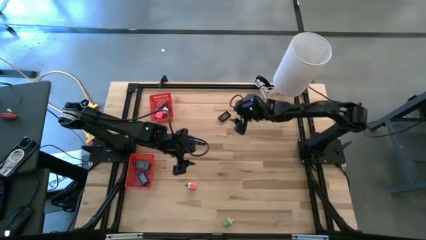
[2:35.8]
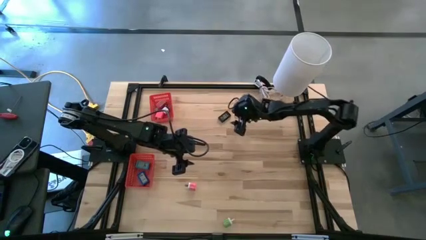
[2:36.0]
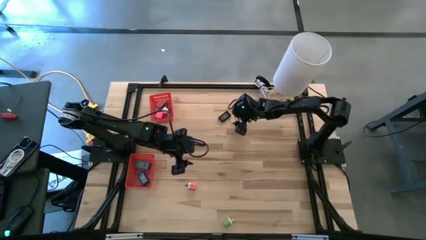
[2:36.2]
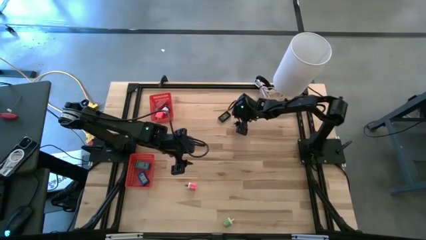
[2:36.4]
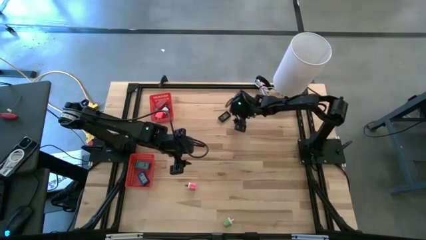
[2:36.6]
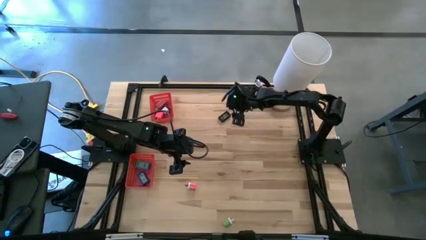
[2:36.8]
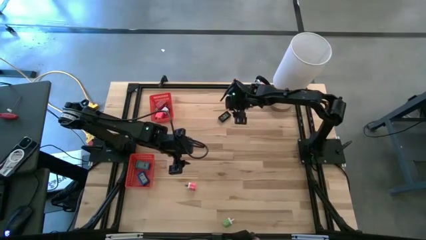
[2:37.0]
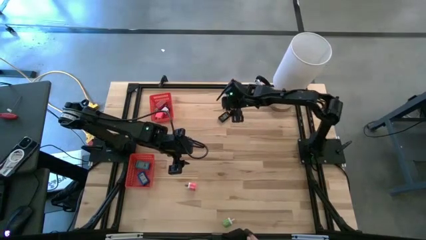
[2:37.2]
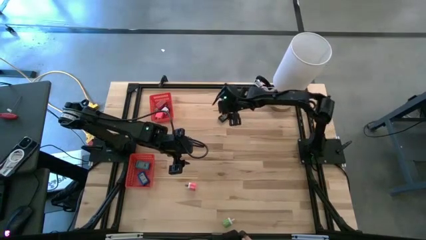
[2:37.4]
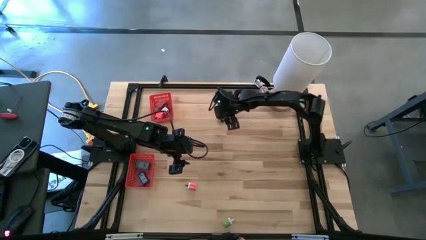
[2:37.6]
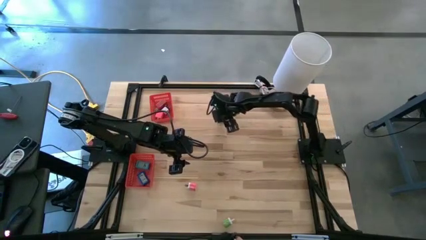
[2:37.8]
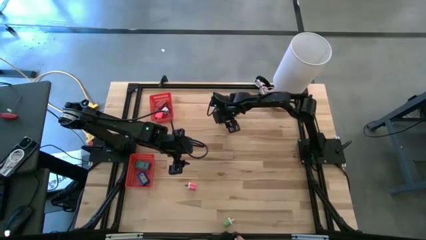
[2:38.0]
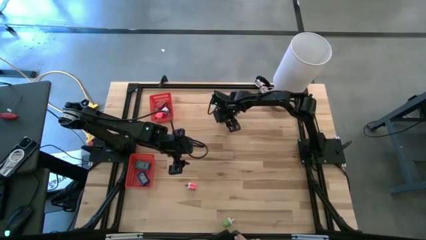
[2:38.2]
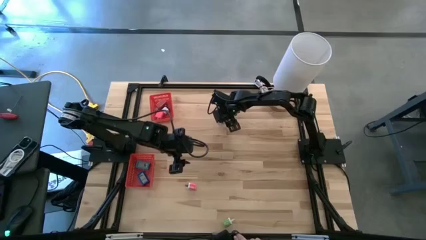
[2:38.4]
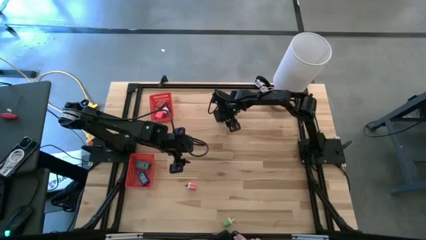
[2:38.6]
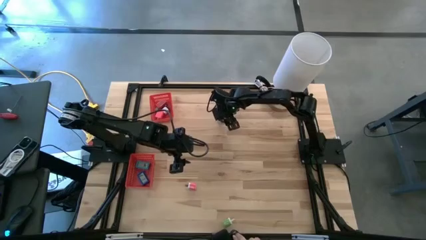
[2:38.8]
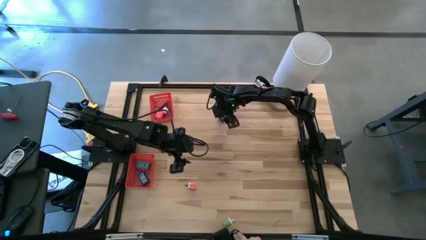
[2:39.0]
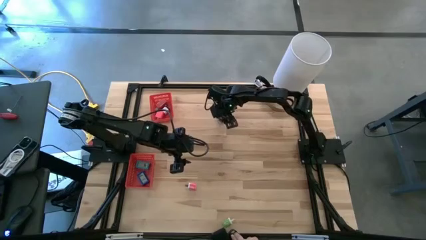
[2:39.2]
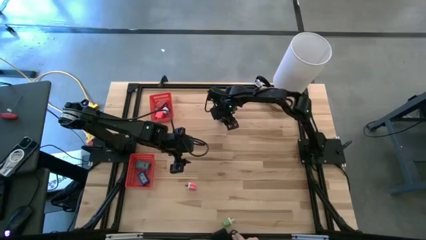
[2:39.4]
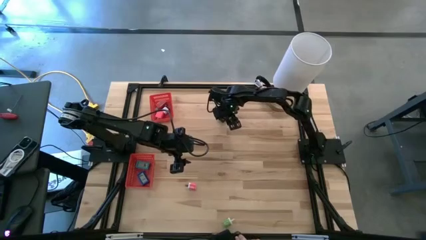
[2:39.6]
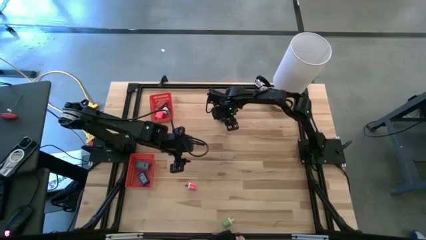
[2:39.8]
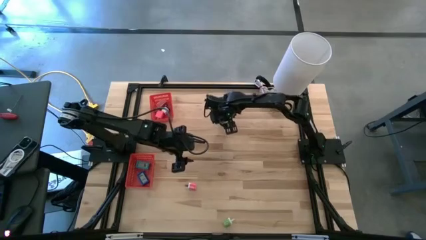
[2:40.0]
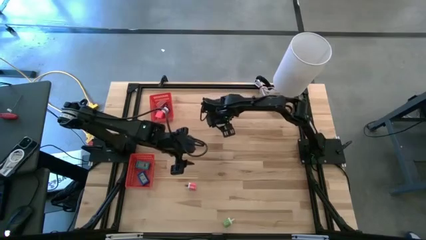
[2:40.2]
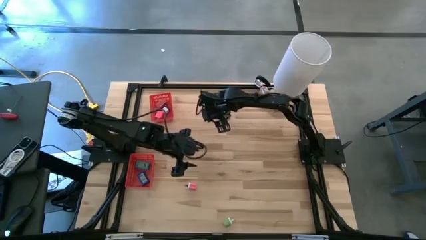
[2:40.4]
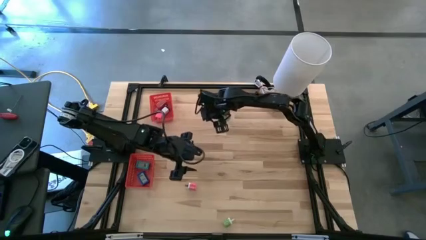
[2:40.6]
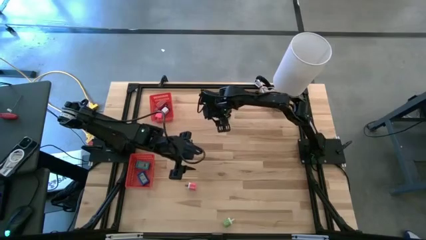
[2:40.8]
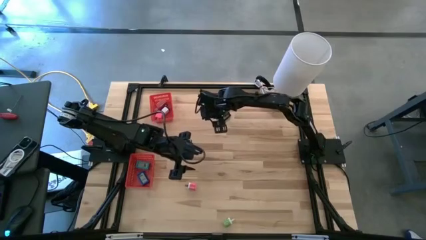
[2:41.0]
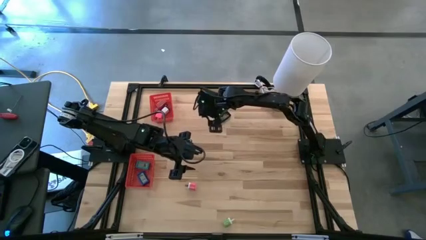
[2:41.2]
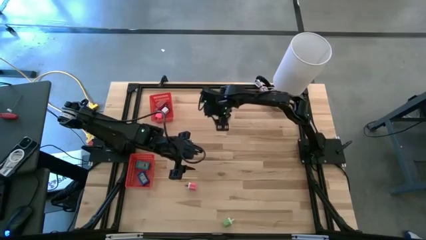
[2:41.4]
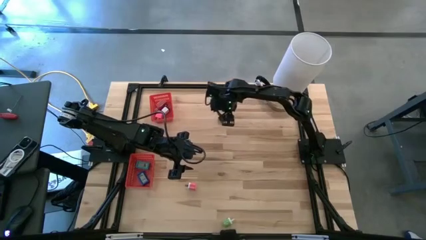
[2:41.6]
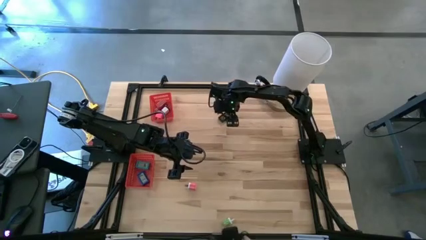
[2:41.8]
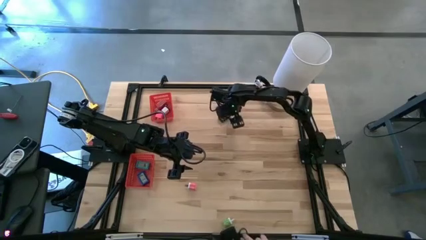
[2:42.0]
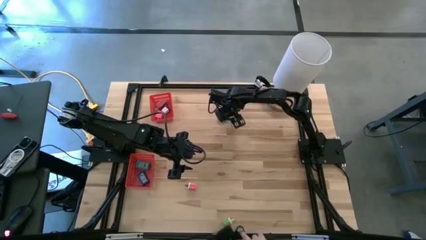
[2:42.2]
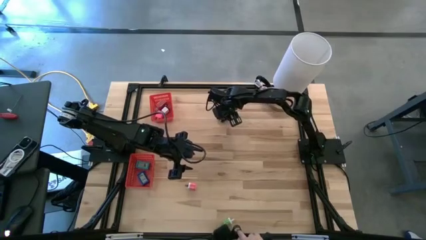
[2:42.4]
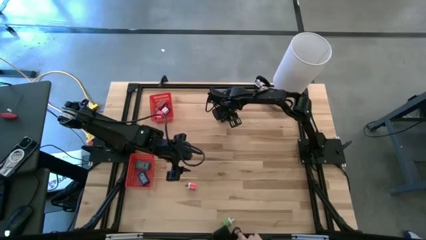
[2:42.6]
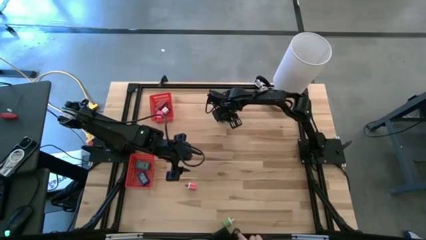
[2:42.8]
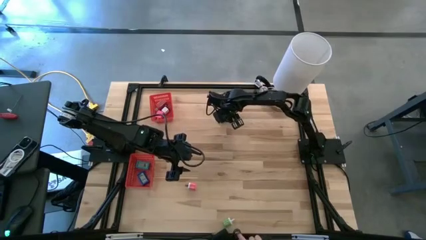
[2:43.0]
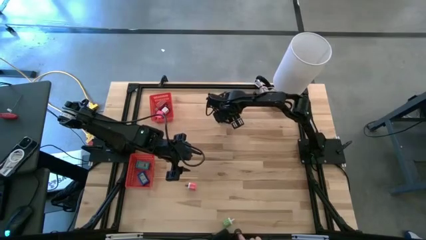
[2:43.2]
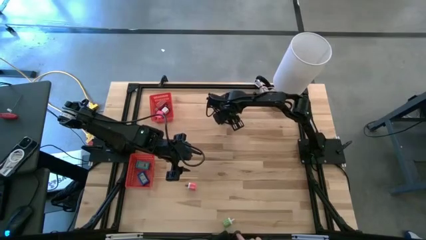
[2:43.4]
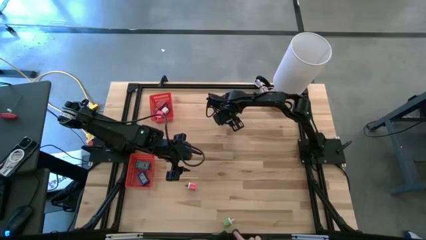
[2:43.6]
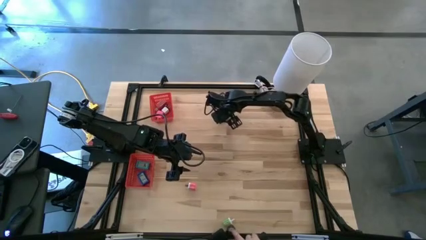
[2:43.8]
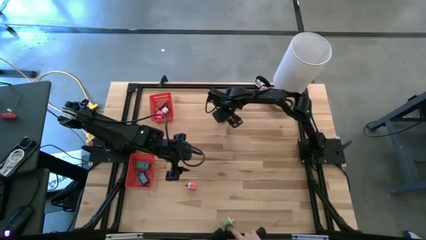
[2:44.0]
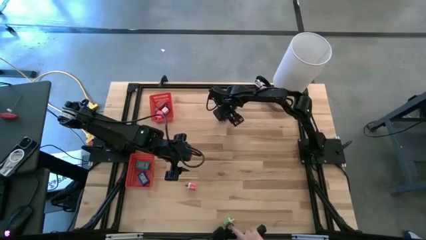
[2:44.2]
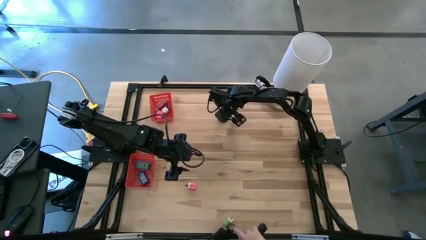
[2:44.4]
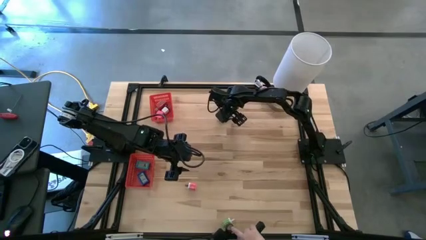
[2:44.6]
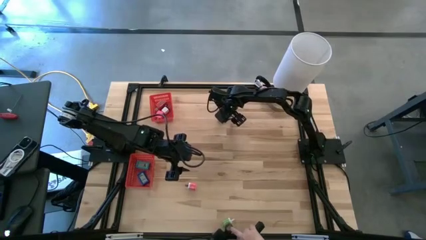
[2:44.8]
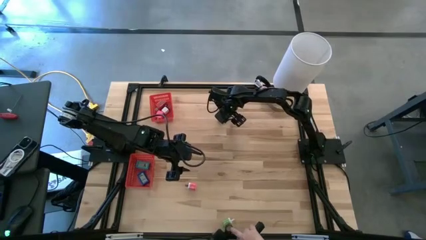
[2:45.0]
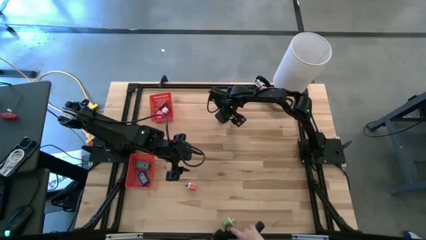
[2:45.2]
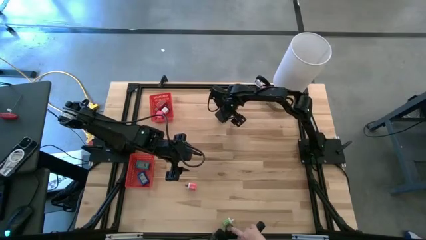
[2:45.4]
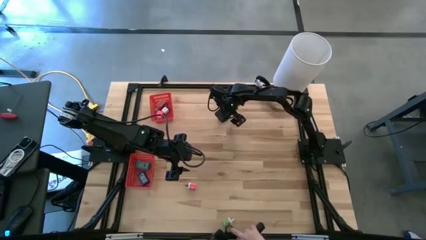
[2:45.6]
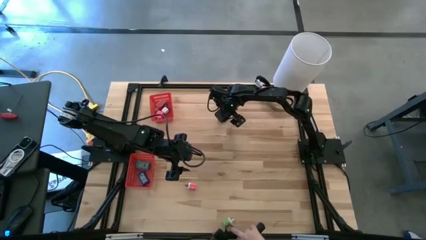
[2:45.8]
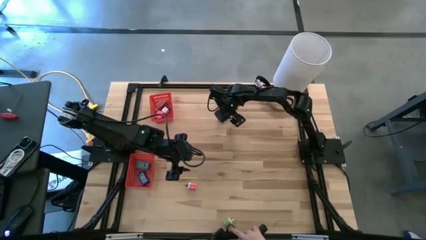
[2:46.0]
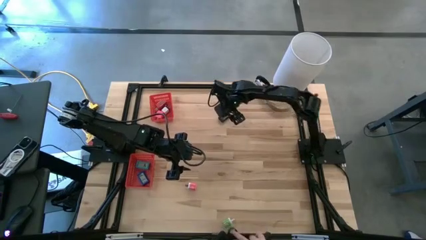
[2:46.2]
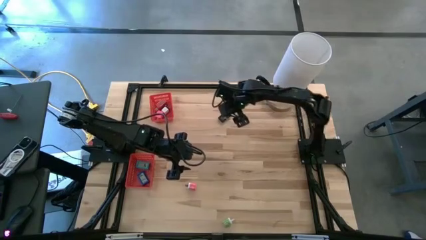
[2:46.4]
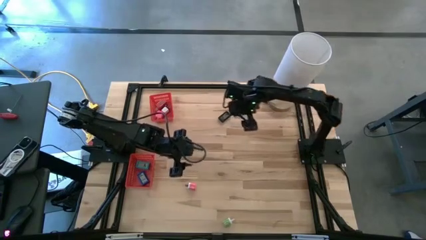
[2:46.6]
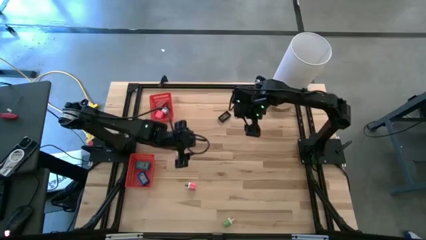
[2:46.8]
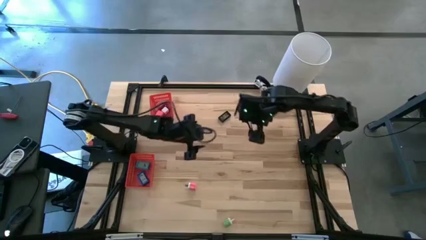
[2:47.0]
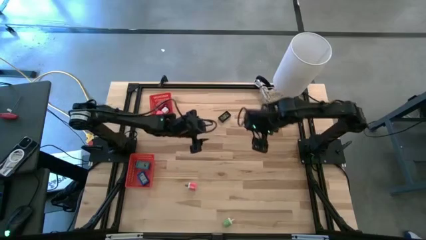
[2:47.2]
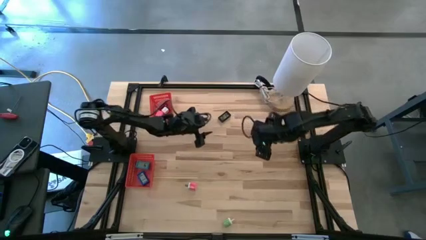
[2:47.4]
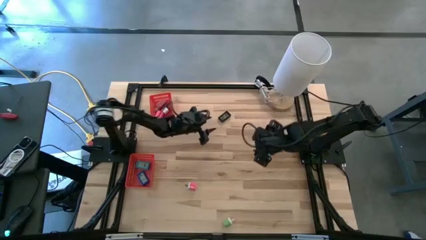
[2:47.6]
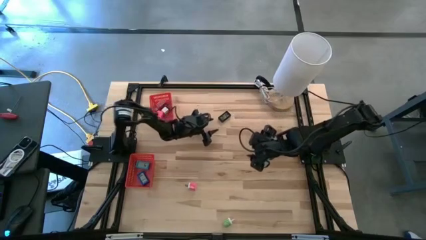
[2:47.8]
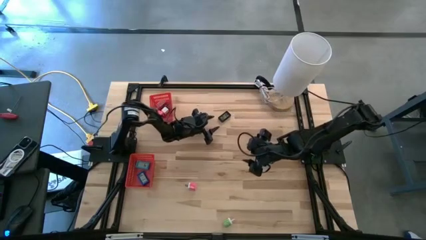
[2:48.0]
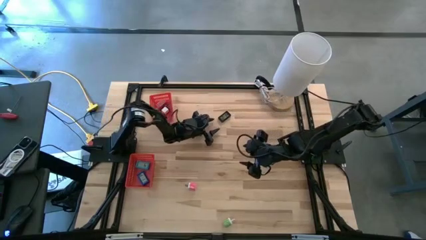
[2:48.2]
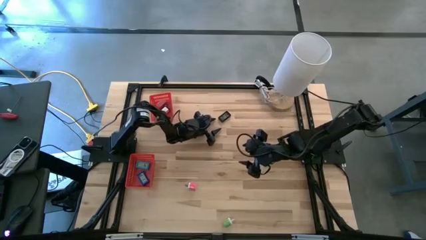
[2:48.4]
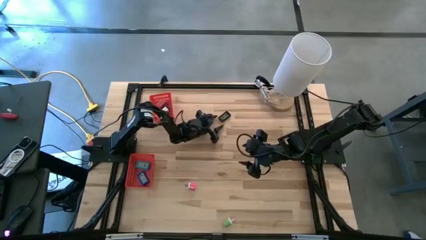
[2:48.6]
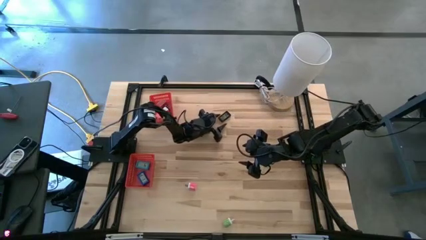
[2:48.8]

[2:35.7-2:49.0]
Task: Pick & Place Office items
Put the black digital clock into the bottom red bin
